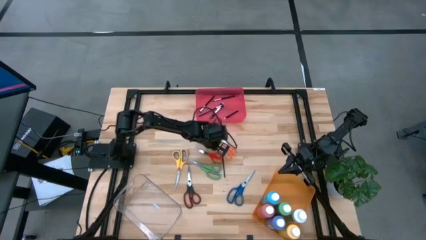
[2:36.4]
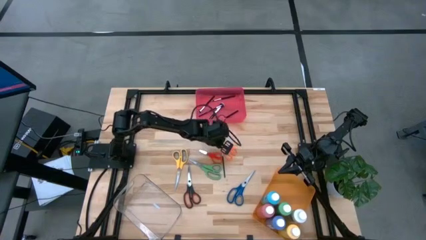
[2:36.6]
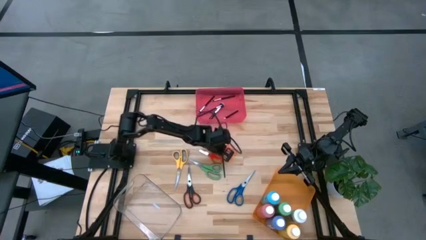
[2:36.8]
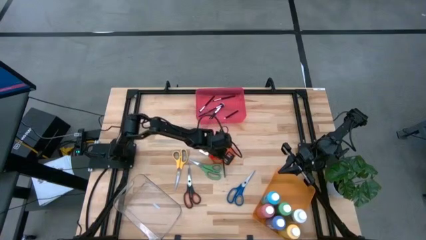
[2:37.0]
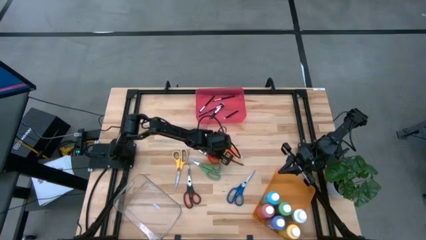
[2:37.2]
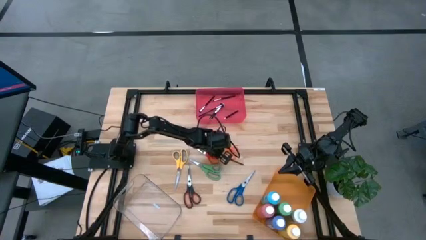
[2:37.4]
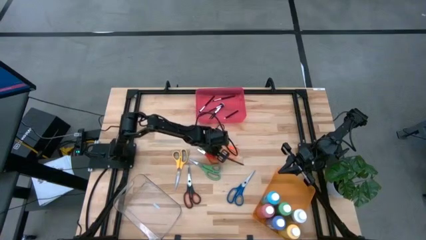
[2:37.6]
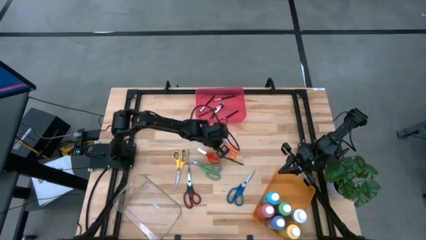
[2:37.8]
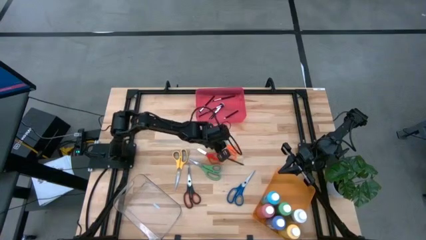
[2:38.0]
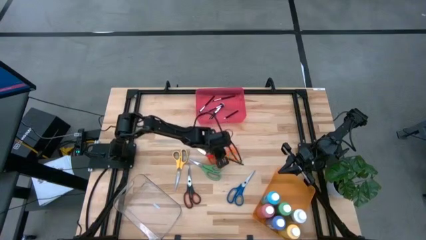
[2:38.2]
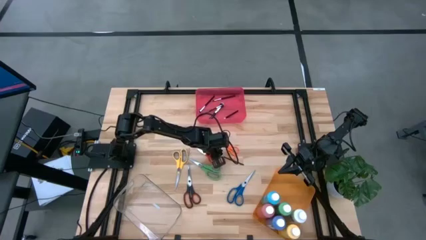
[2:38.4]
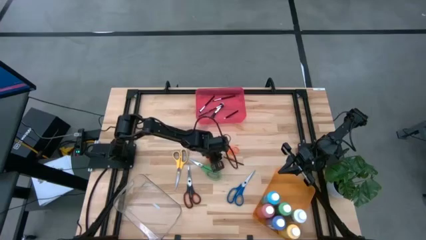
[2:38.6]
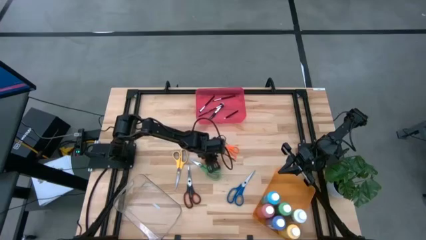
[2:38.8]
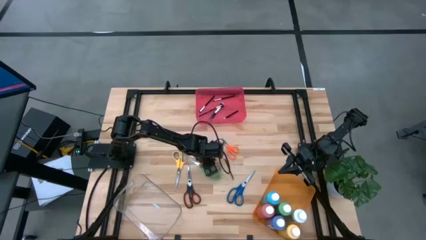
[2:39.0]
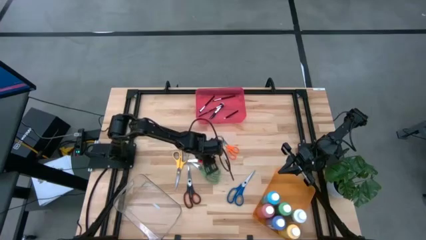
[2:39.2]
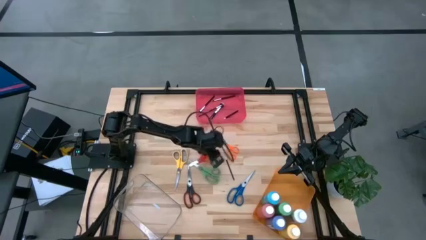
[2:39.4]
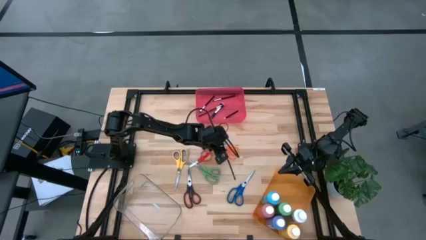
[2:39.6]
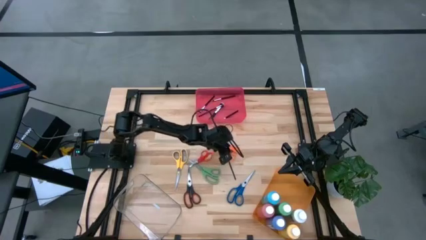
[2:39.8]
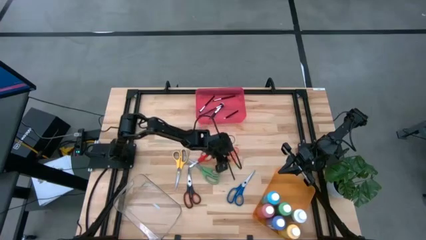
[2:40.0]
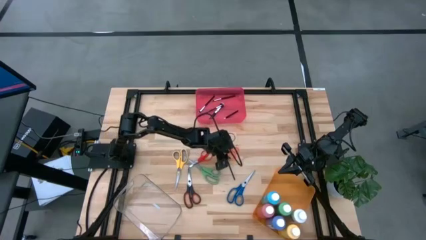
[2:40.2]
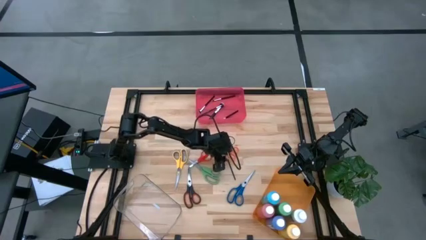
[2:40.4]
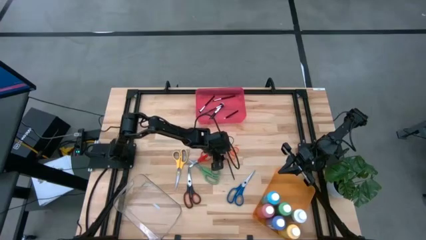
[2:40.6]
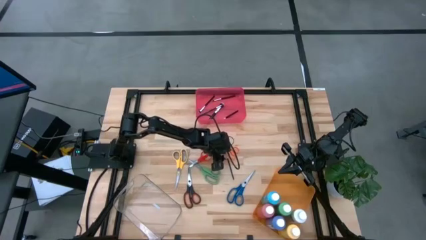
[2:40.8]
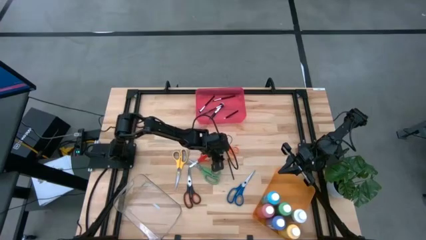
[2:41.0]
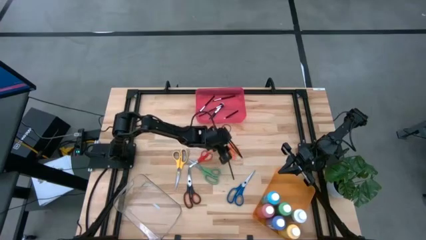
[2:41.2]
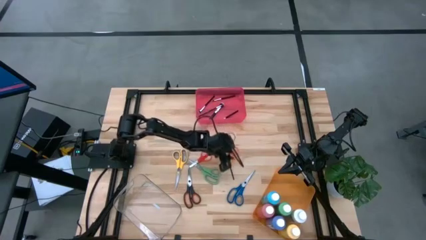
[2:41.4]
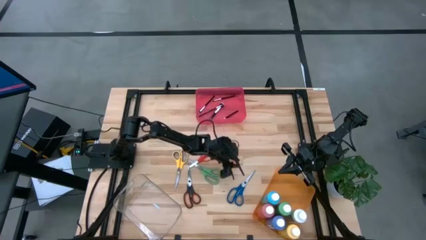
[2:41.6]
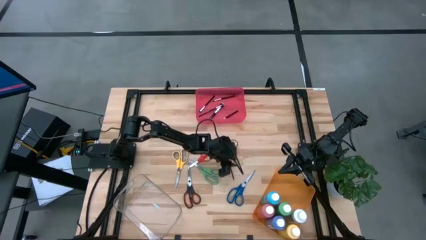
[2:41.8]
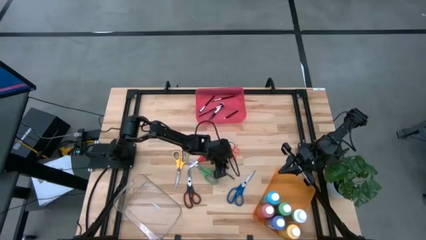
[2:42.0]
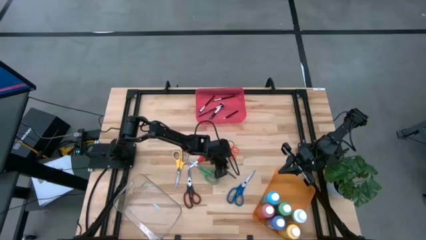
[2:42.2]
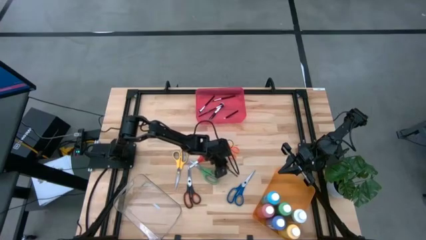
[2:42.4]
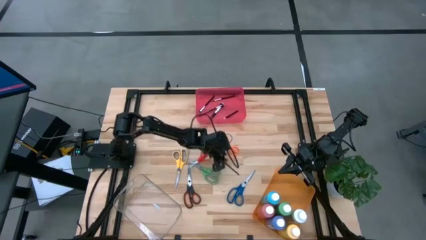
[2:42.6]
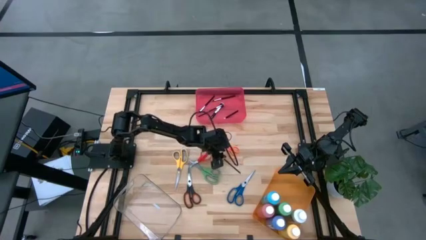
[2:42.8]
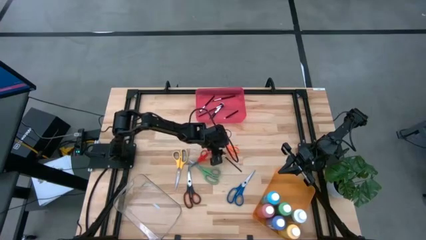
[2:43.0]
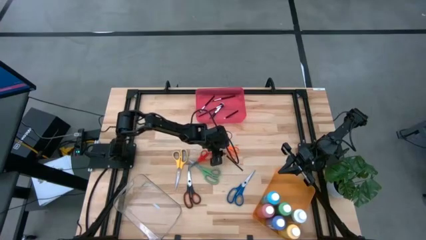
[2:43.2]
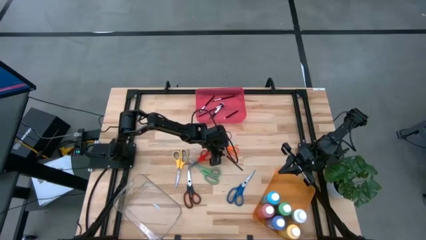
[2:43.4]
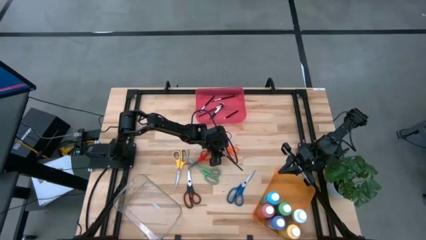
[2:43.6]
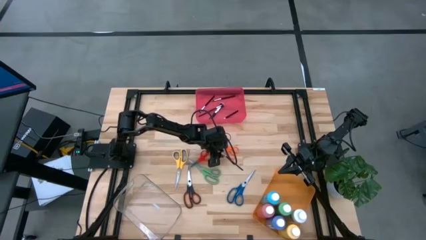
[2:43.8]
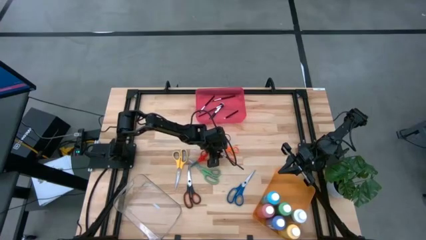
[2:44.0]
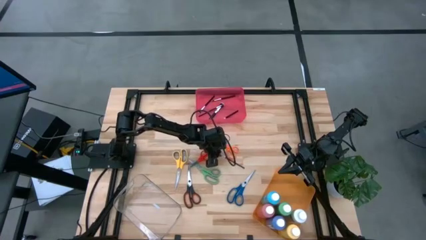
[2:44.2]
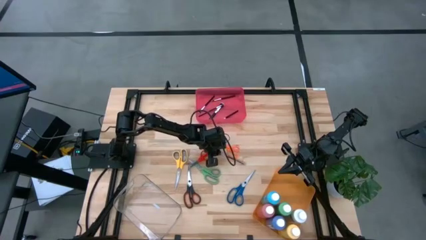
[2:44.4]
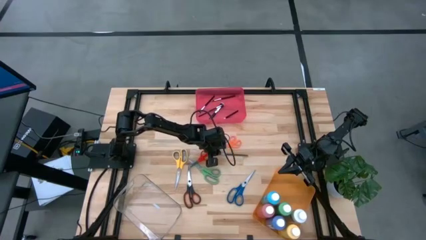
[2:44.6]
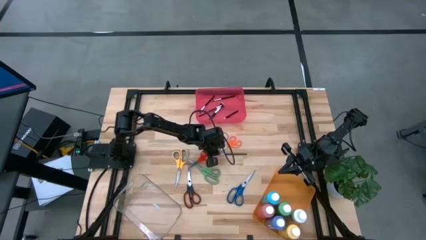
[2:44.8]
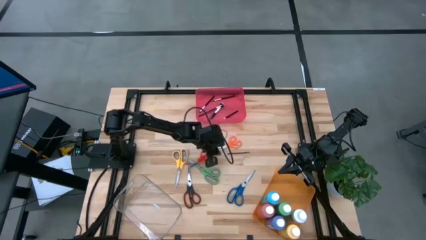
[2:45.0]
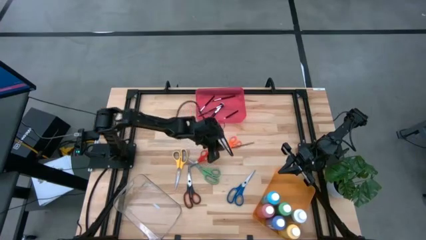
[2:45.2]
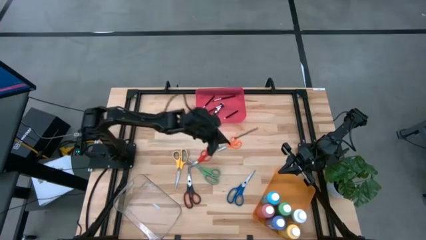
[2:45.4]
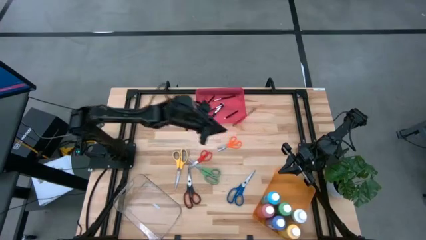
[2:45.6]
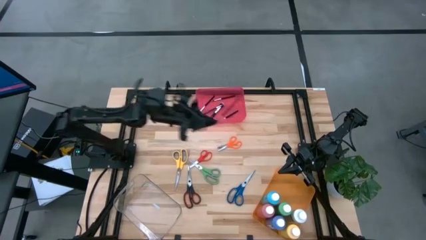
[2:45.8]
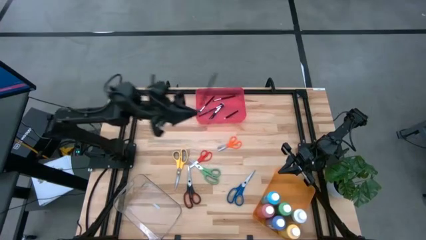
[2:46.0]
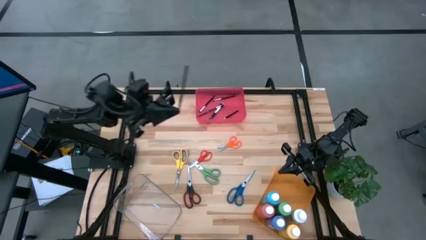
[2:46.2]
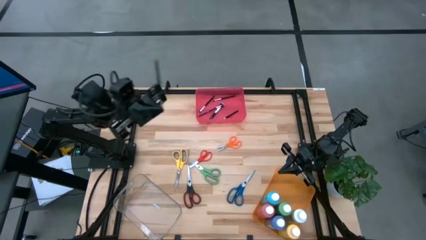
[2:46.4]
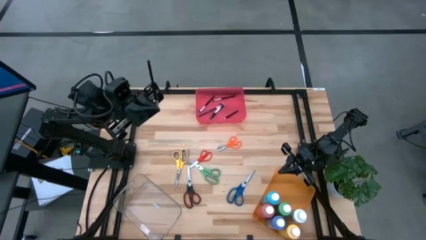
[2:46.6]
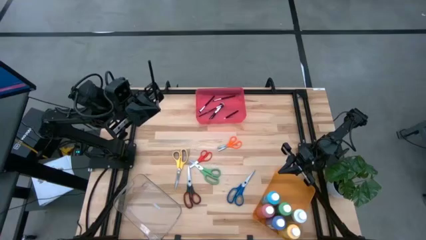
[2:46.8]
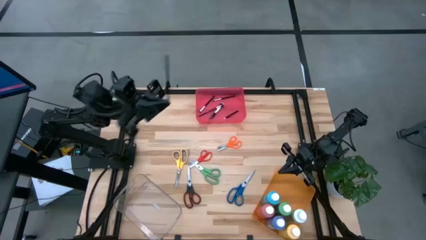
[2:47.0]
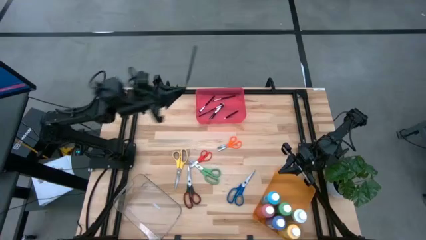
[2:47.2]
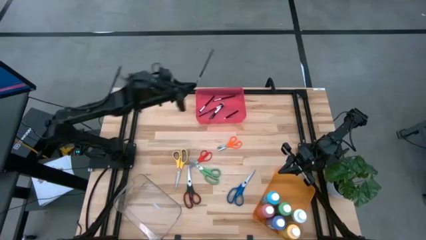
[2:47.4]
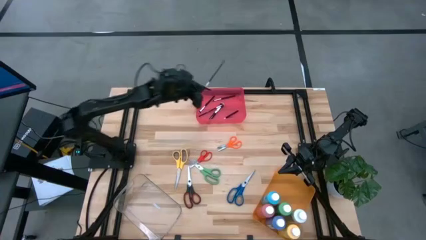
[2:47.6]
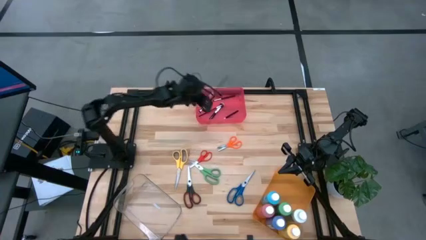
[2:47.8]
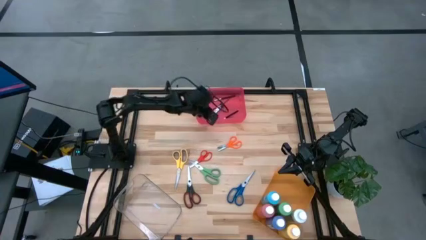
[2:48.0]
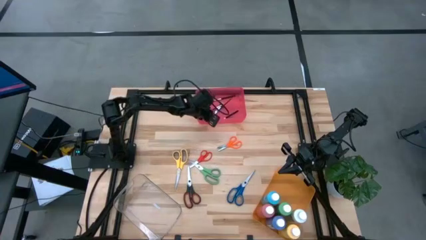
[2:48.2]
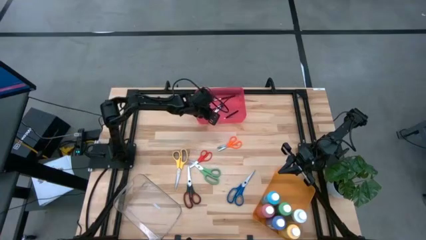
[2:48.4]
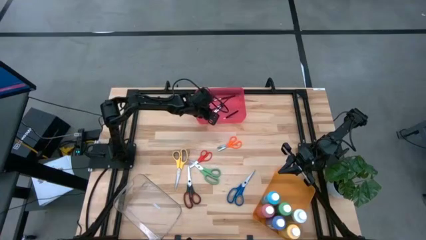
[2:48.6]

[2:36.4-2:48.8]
Task: Pick & Place Paint Supplies
Put the silver brush into the red bin

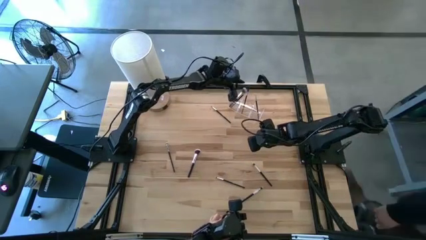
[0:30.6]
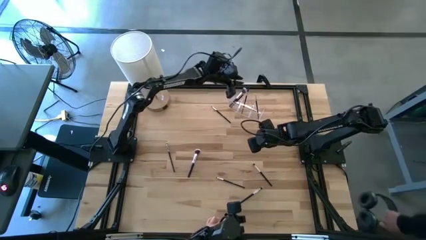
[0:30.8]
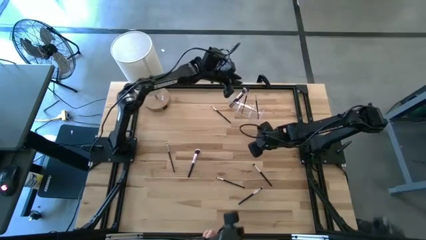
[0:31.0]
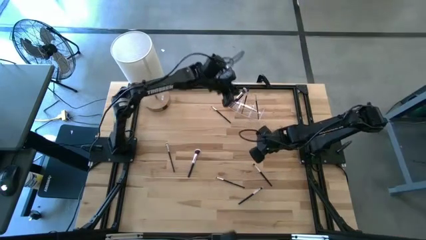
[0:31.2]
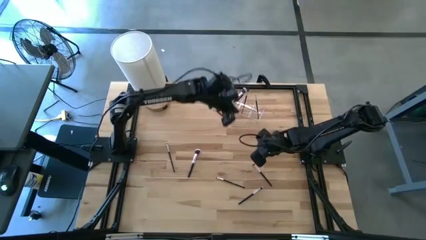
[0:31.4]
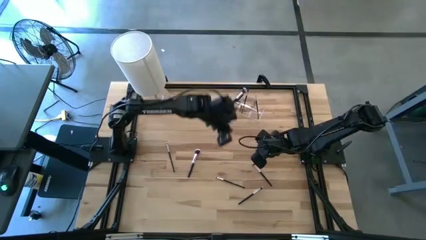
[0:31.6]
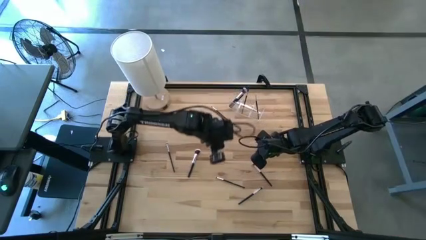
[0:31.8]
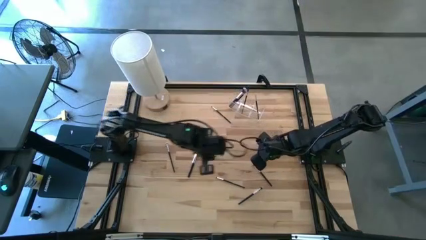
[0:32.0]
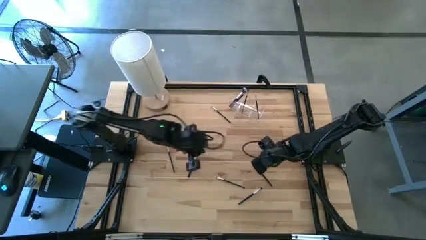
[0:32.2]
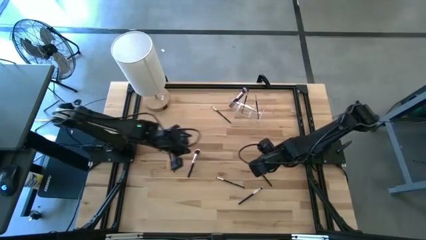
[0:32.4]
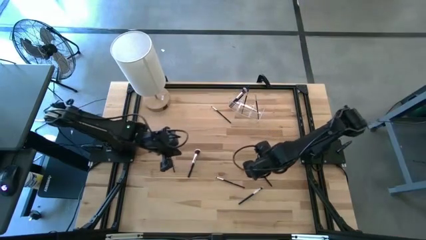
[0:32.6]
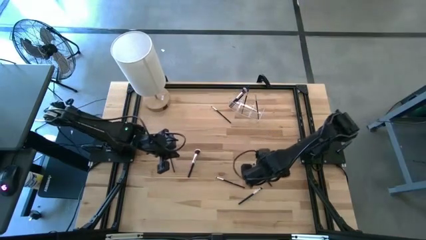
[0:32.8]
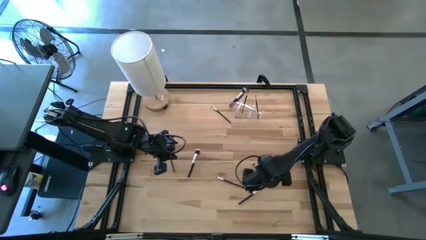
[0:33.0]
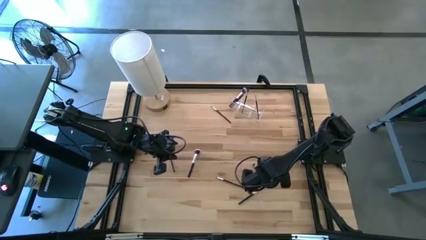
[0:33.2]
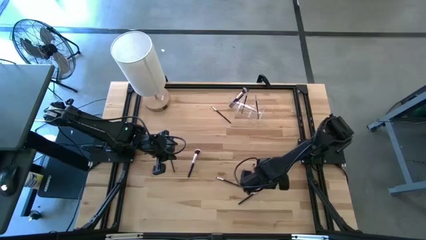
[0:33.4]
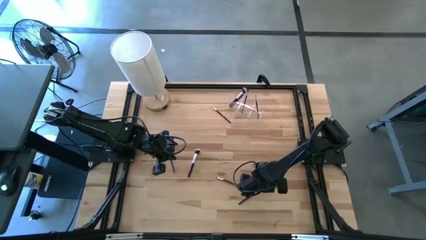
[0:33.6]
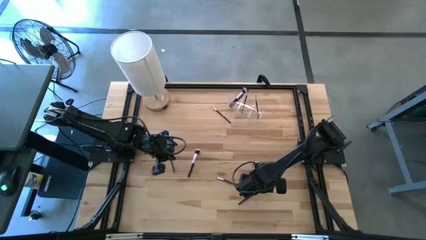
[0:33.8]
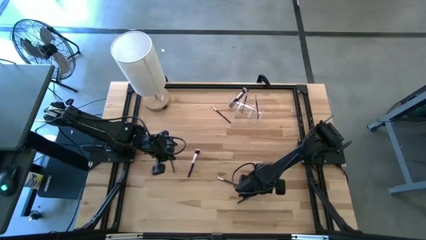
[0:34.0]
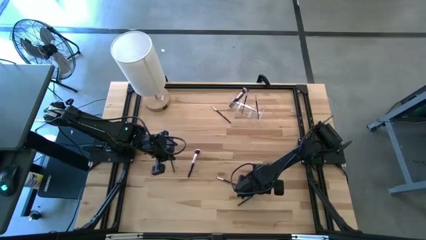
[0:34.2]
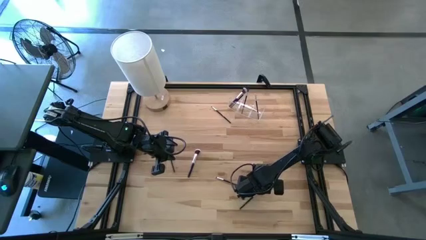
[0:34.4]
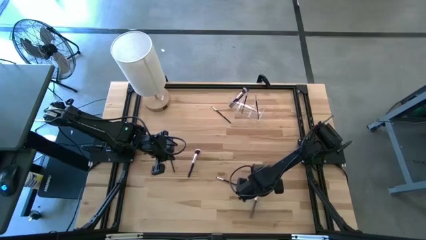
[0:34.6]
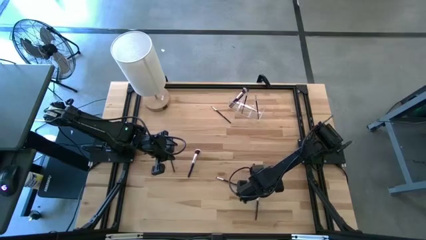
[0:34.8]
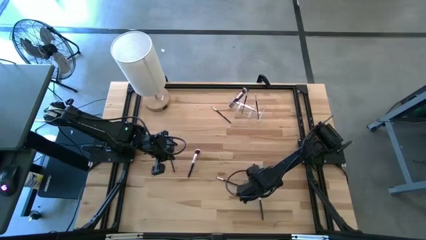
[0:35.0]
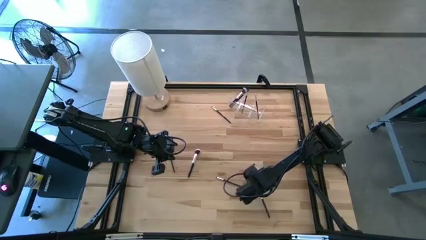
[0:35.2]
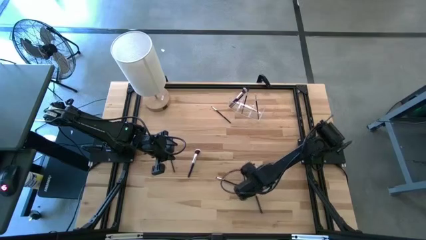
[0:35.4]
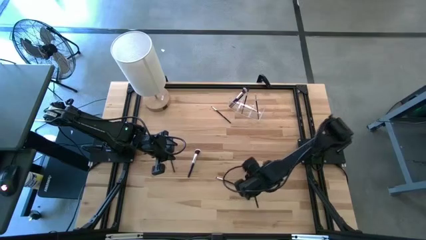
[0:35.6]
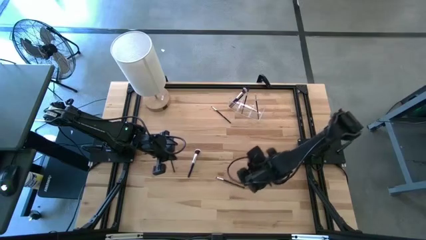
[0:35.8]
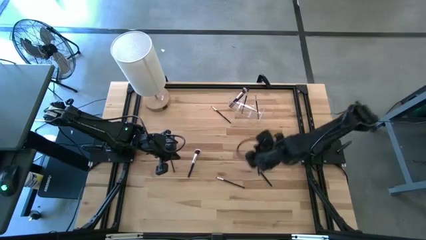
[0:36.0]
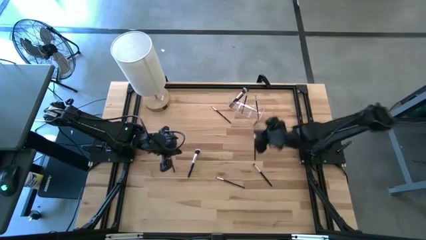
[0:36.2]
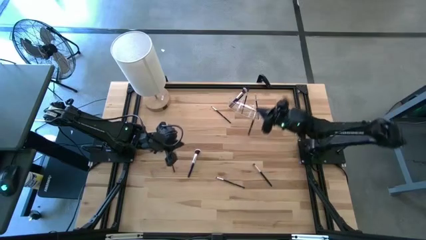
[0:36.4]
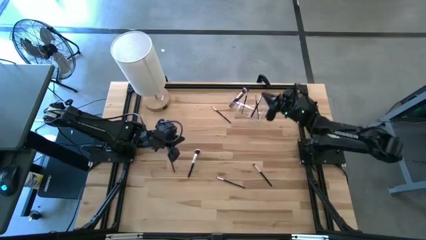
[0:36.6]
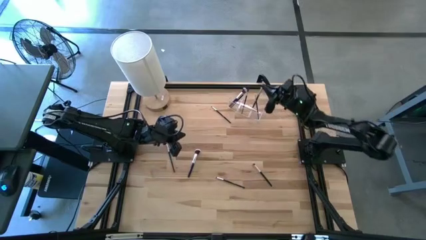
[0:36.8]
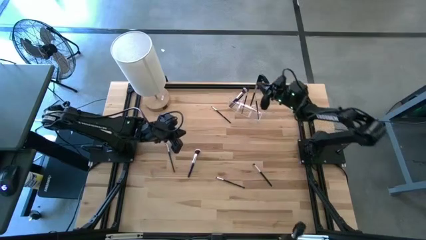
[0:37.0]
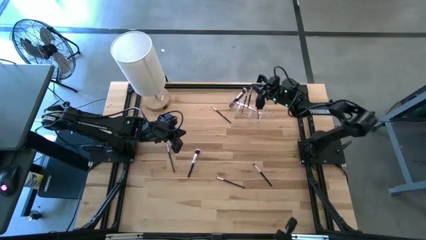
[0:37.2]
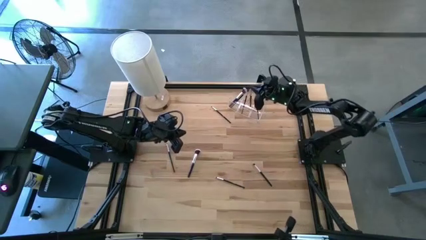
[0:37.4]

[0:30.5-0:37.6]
Task: Pick & Place Makeup Brushes
Put the black makeup brush into the transparent organizer
